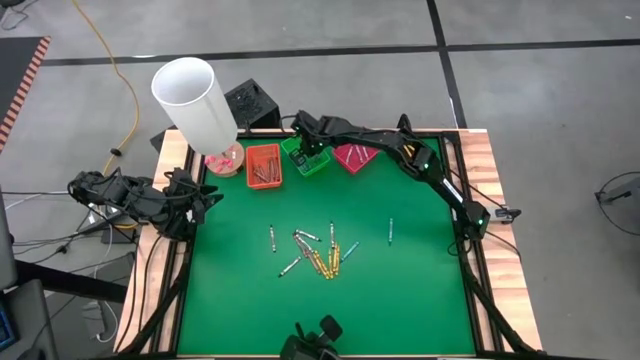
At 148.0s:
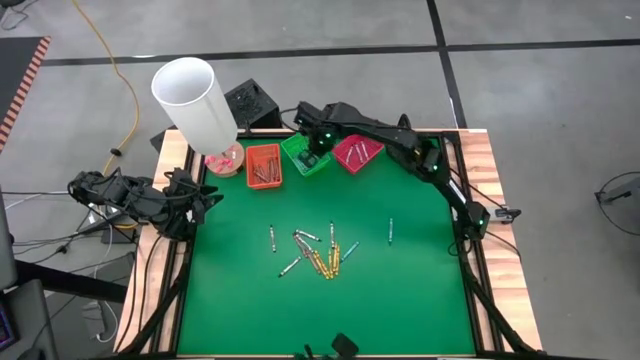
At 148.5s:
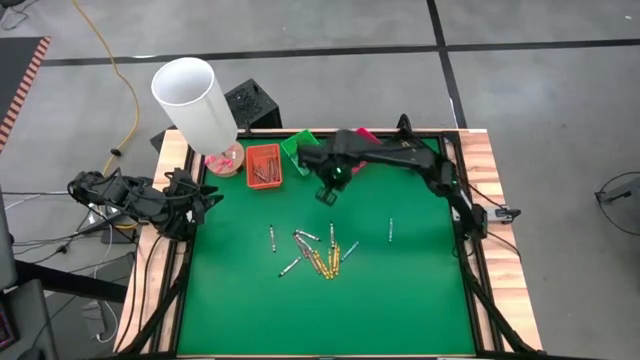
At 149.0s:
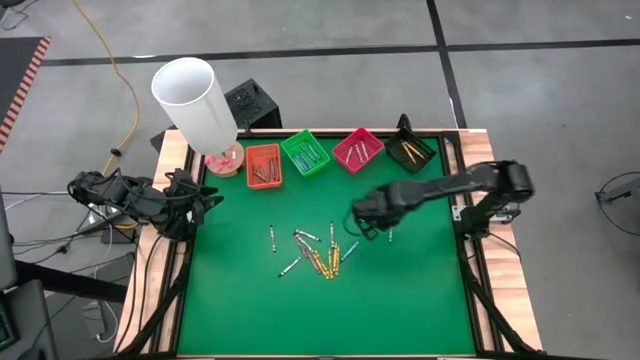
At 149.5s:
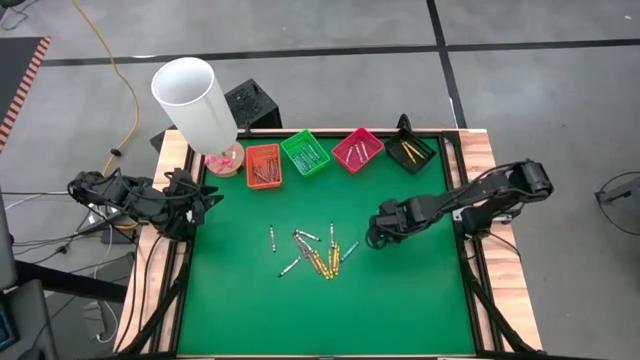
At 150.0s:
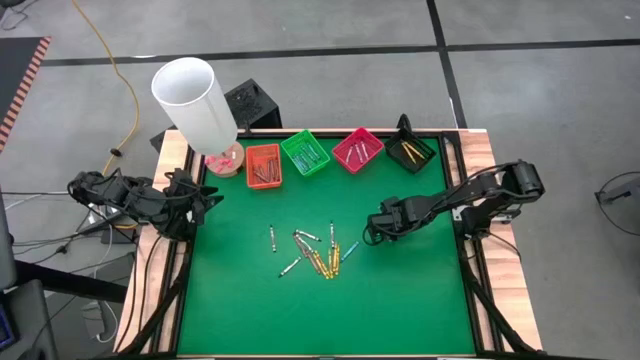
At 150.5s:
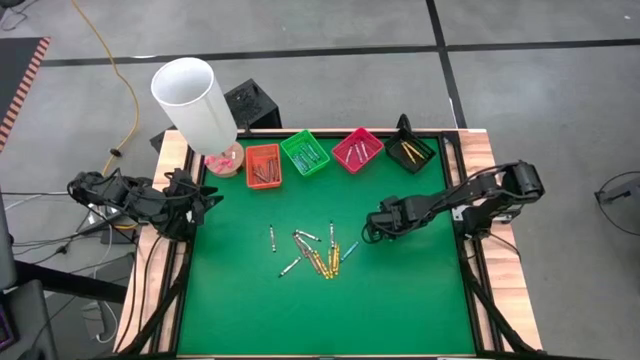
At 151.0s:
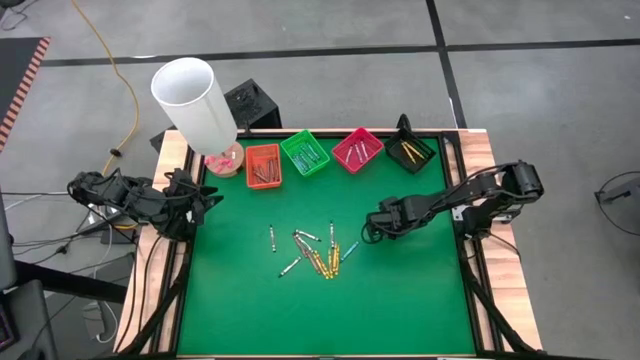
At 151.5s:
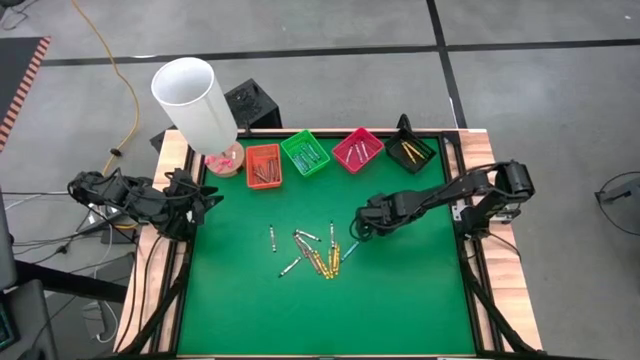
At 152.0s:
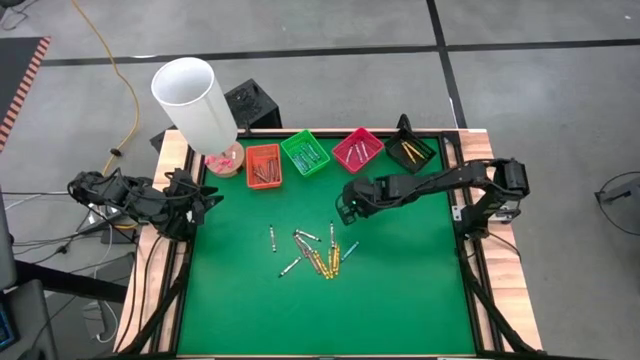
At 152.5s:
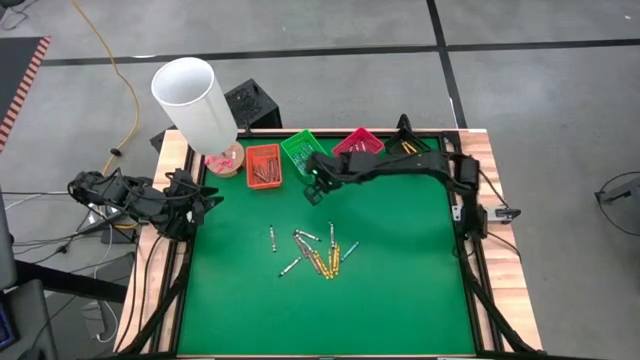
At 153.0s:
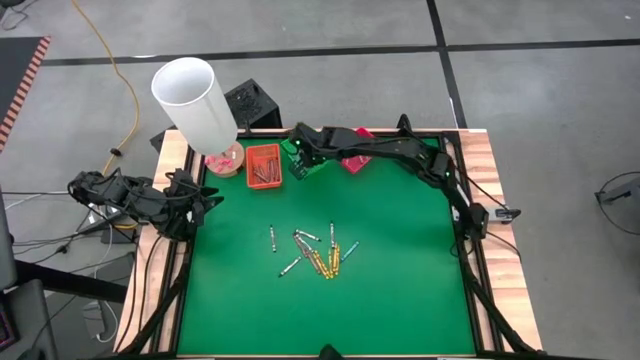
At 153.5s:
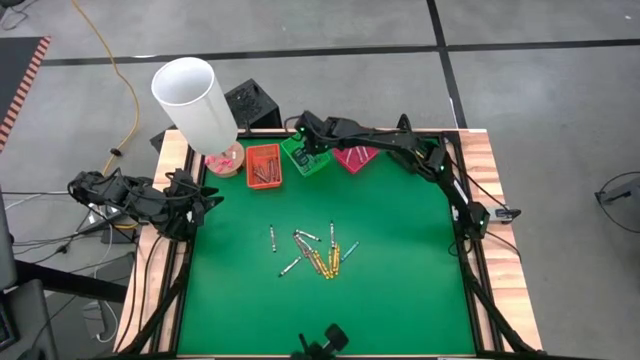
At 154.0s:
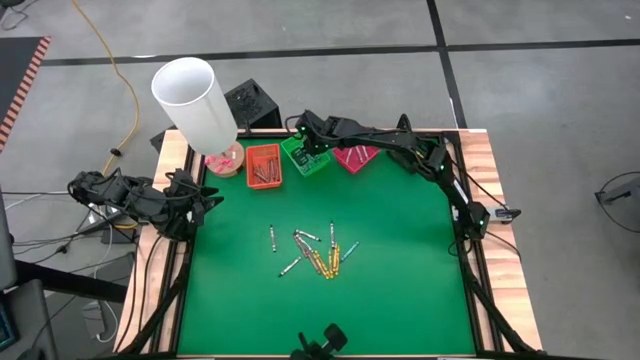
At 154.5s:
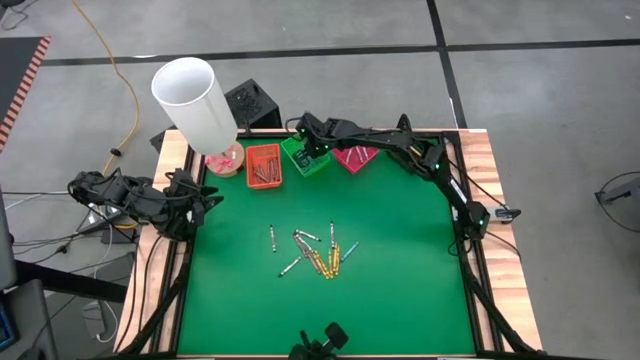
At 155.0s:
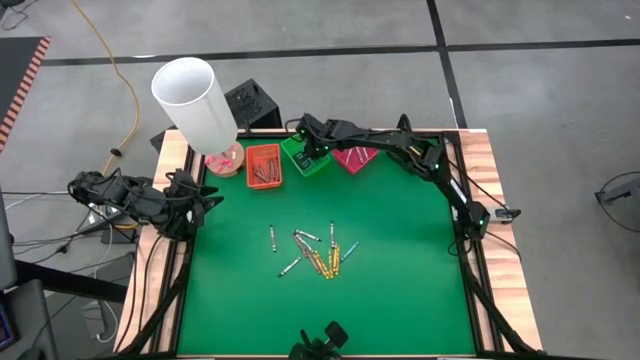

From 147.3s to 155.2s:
Task: Sort crayons
Put the blue/green crayon into the green bin

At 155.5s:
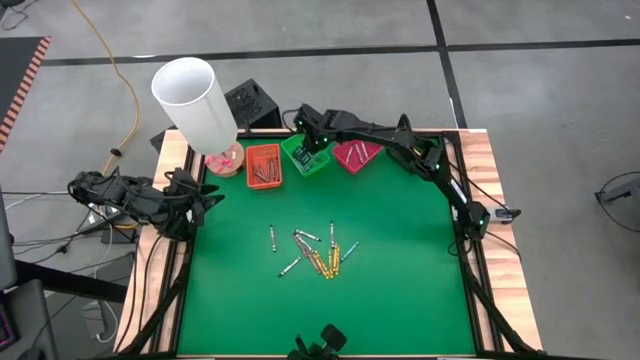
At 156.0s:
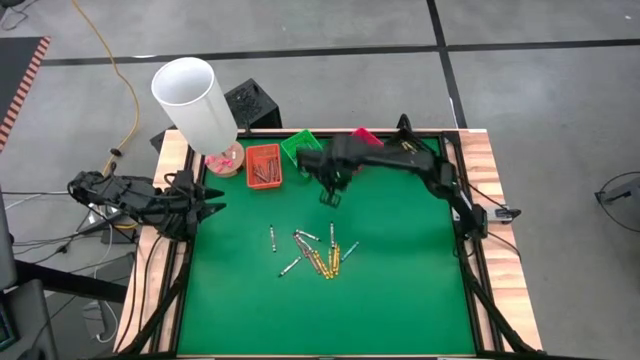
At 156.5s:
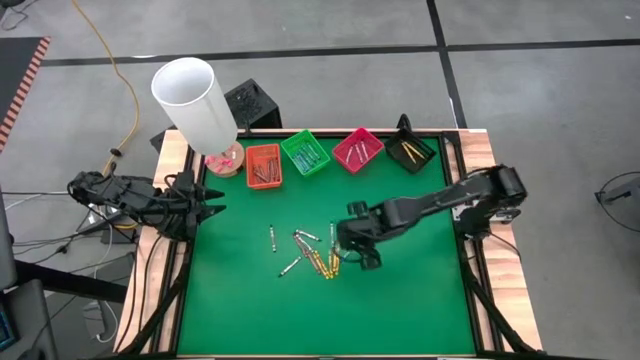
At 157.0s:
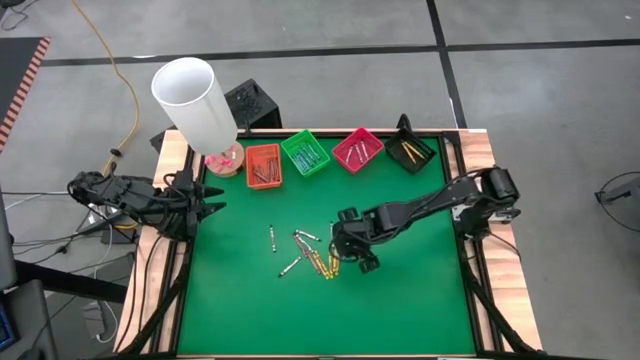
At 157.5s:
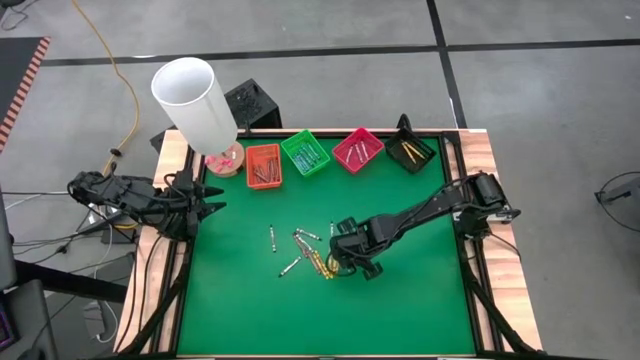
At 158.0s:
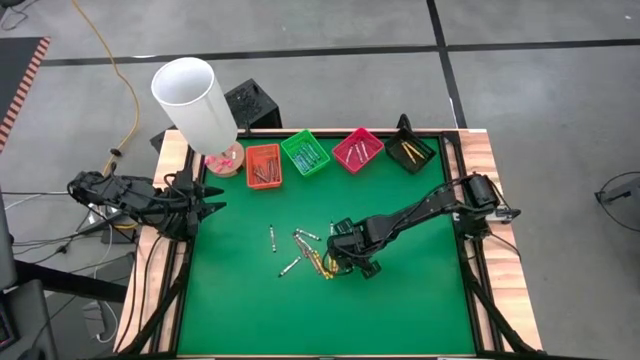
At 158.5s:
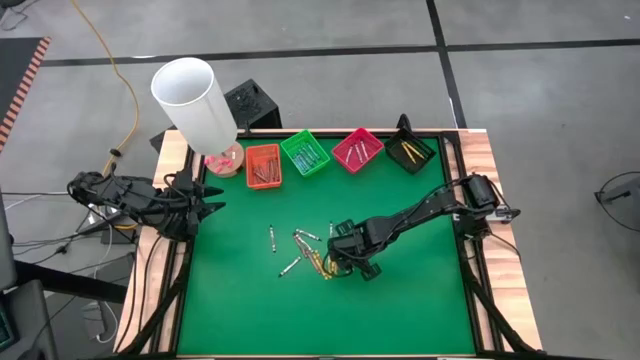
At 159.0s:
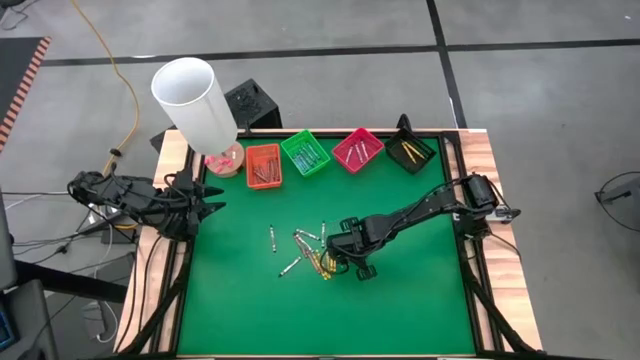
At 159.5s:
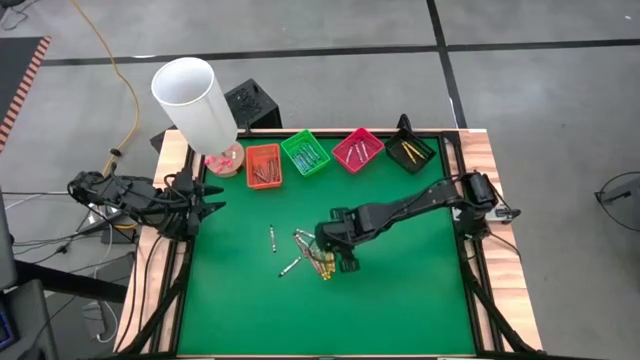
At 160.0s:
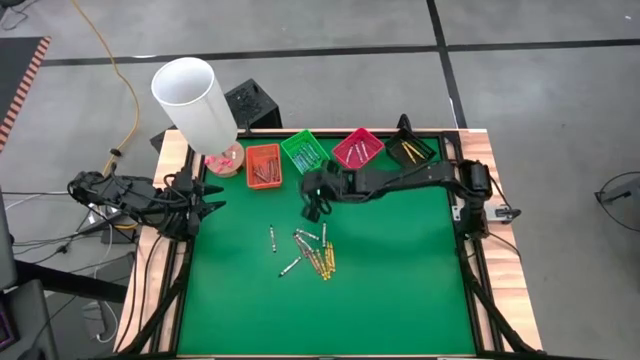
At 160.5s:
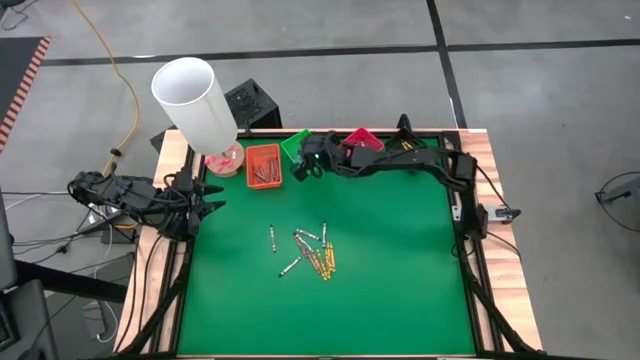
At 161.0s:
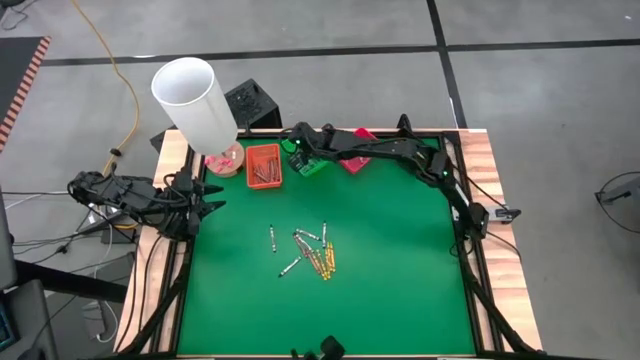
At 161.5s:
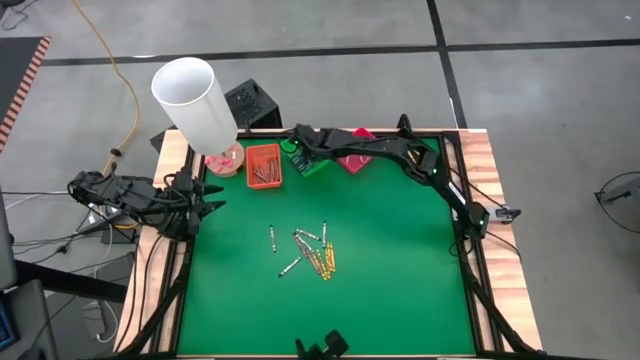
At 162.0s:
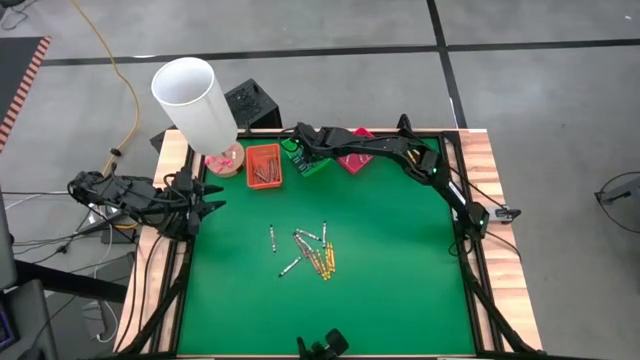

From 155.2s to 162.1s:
Put the blue/green crayon into the green bin

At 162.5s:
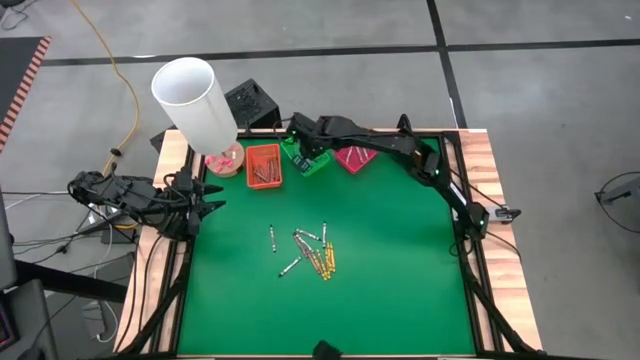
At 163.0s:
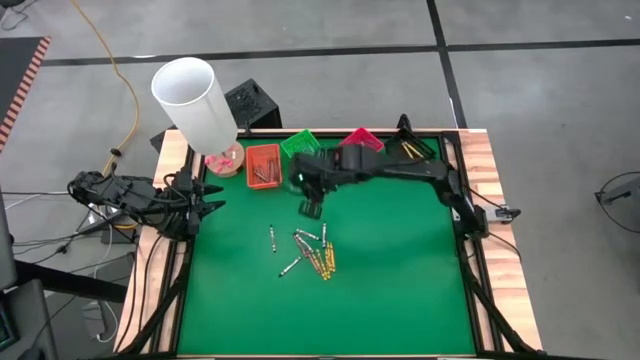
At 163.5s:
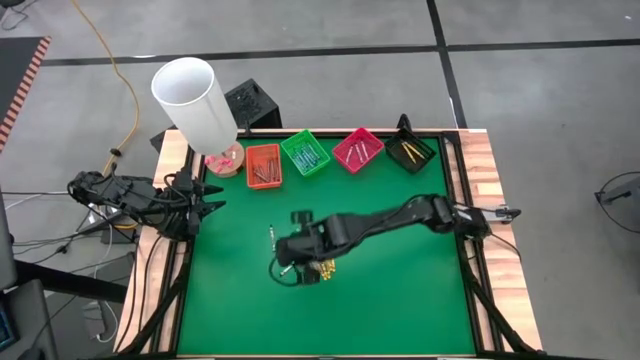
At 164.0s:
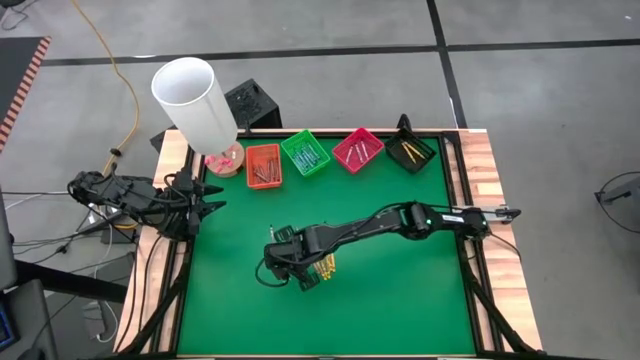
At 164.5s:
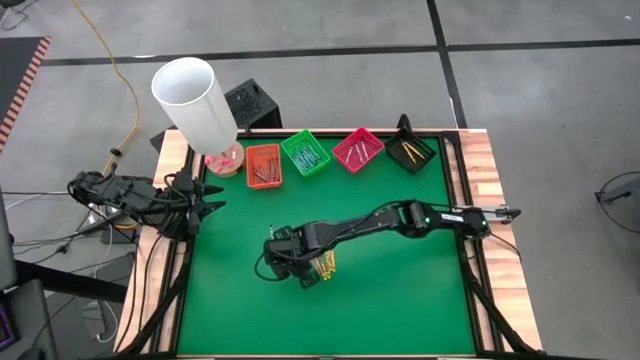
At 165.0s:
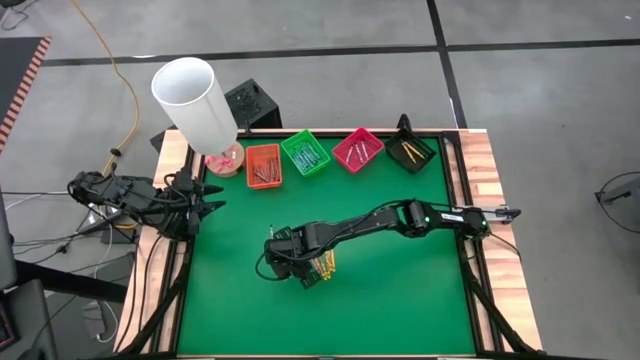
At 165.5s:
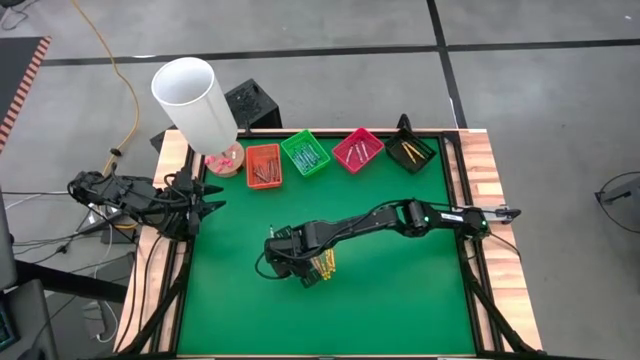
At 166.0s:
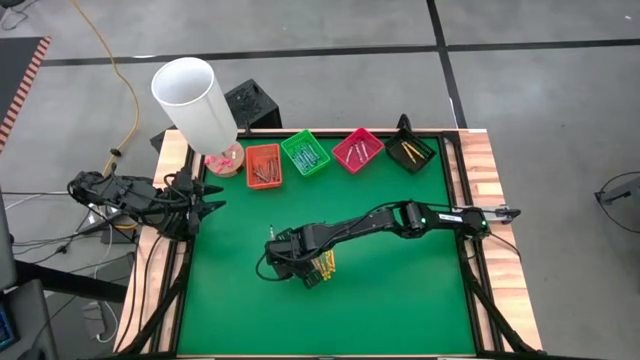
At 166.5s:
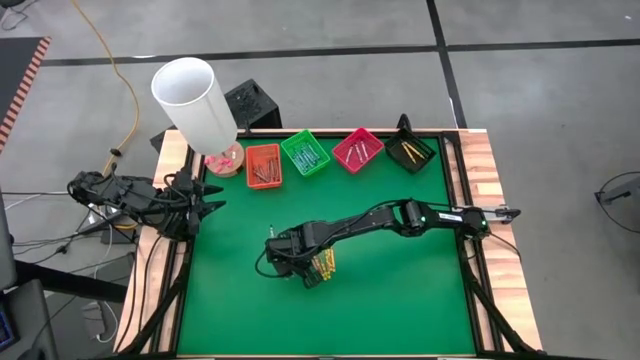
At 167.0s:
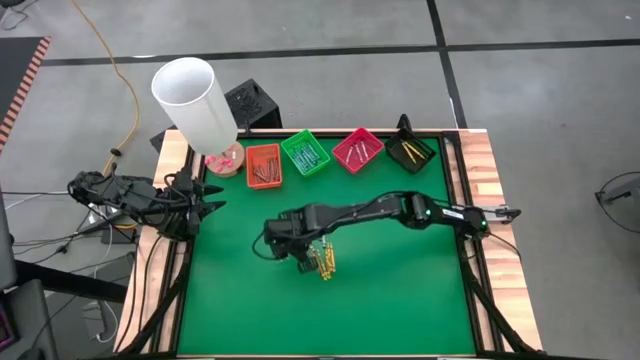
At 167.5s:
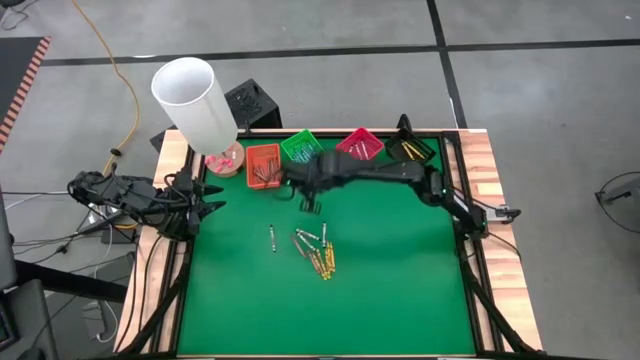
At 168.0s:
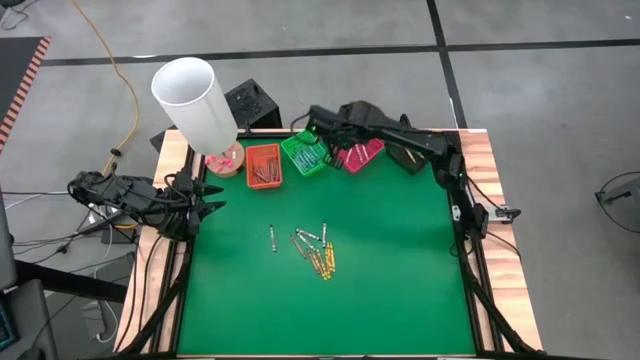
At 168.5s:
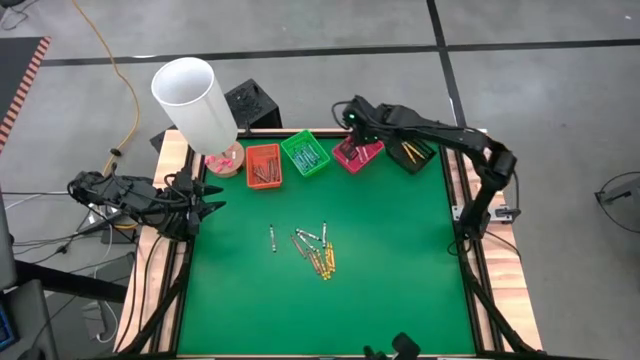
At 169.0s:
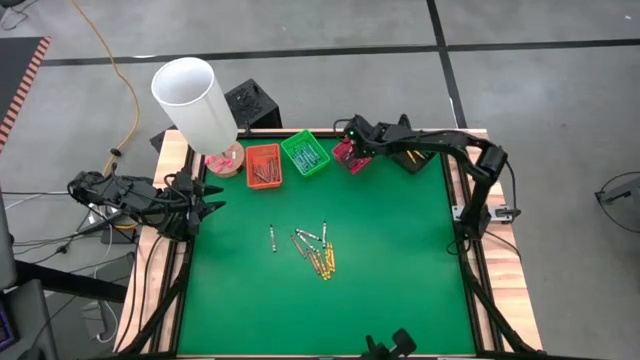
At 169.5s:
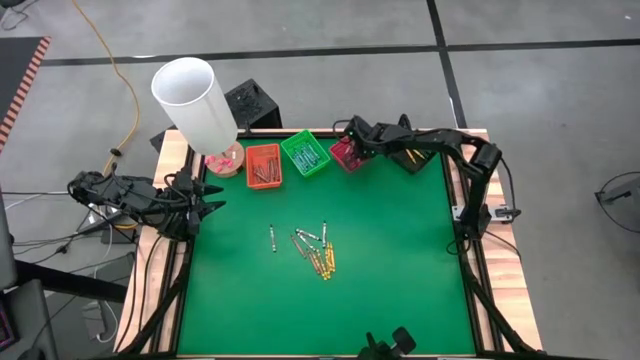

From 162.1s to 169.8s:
Put the black crayon into the red bin
